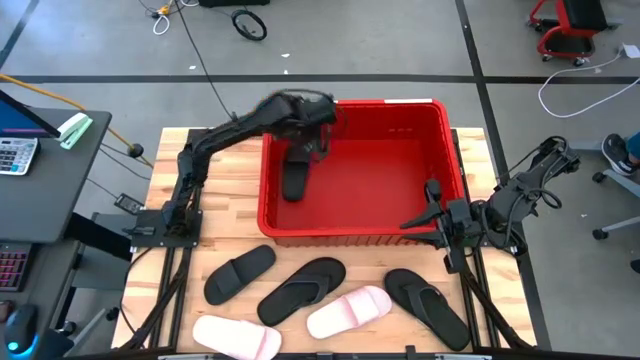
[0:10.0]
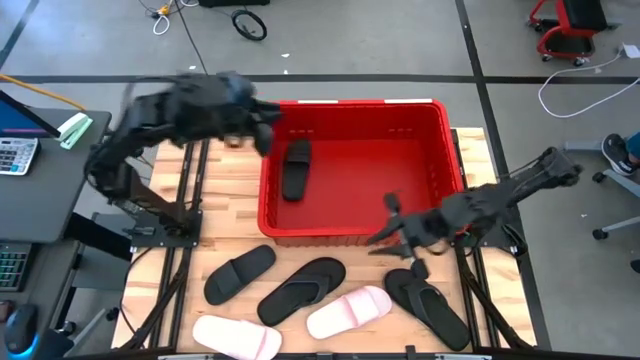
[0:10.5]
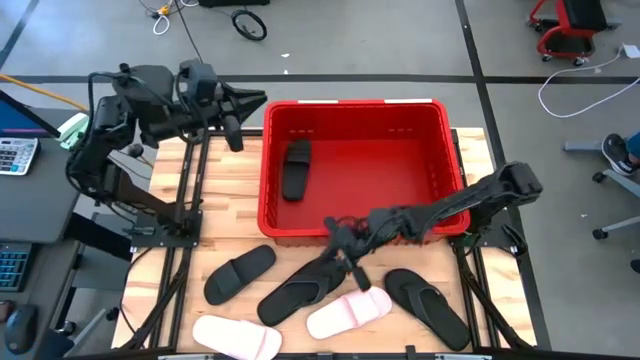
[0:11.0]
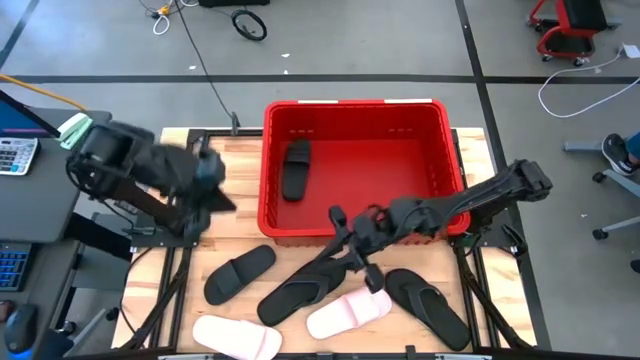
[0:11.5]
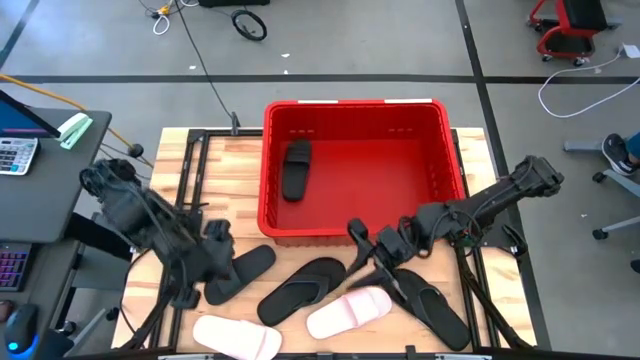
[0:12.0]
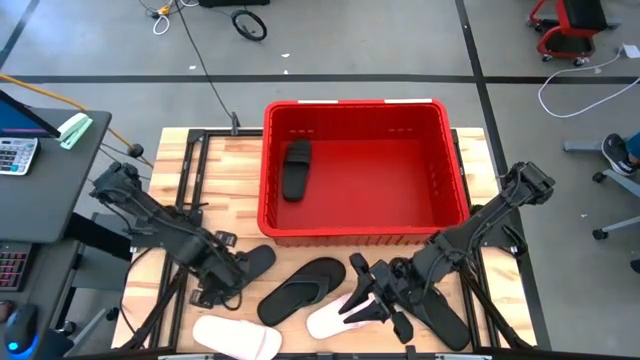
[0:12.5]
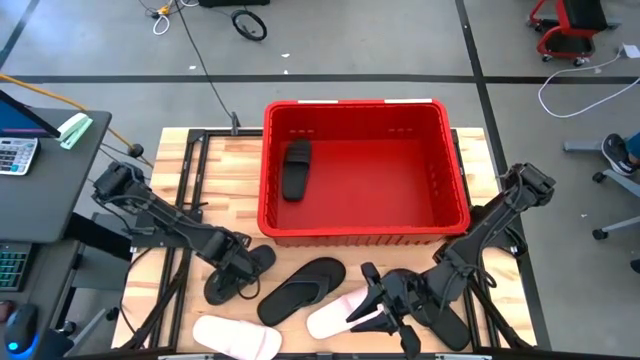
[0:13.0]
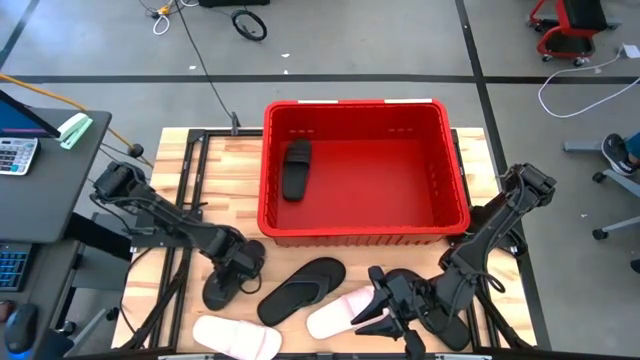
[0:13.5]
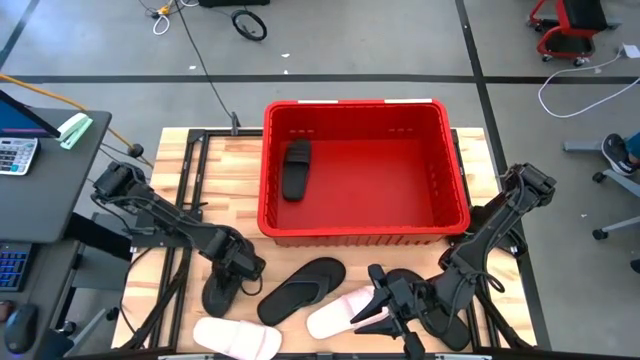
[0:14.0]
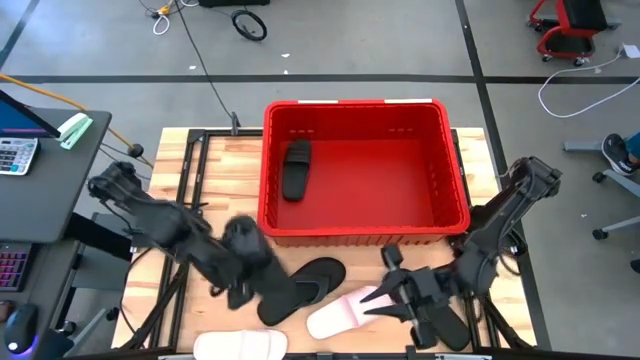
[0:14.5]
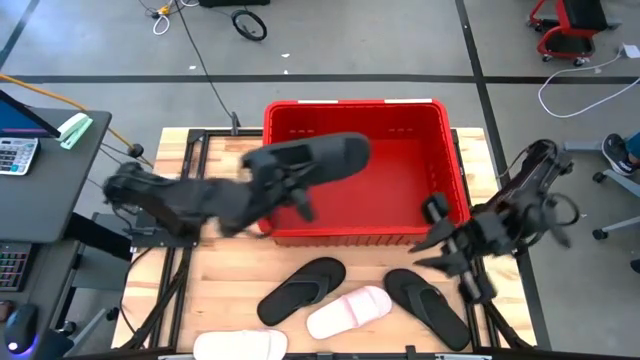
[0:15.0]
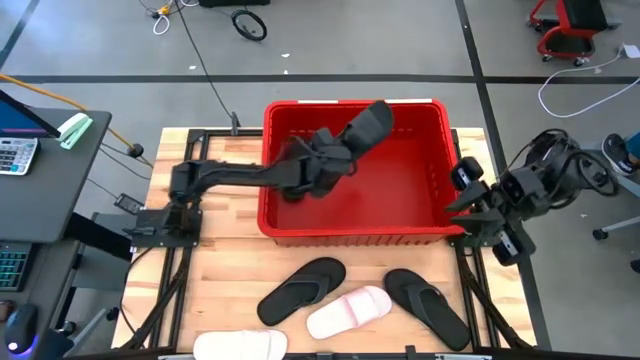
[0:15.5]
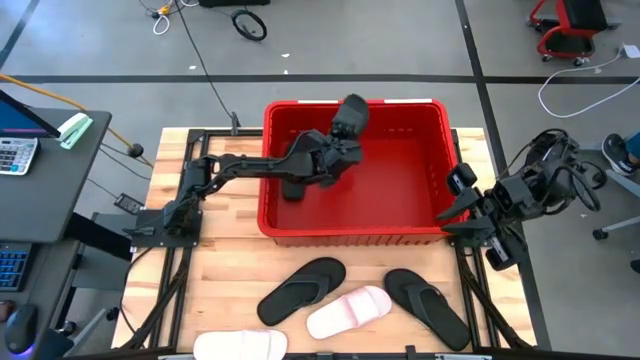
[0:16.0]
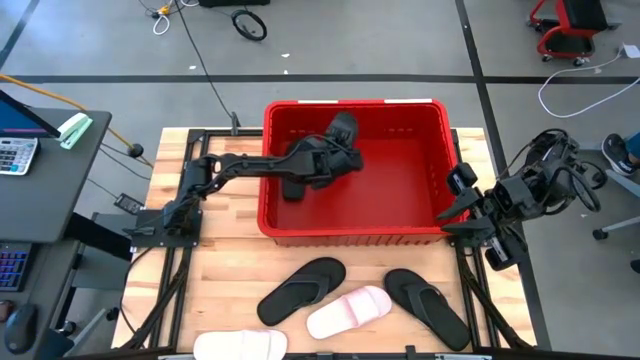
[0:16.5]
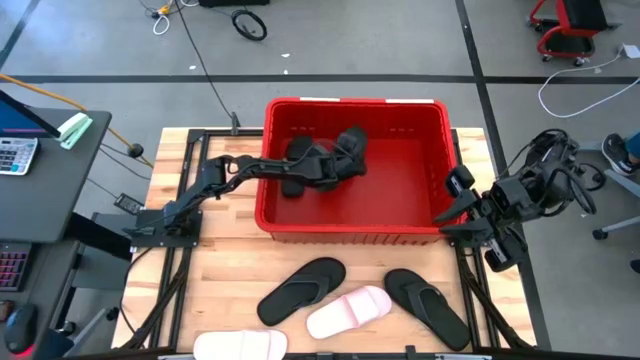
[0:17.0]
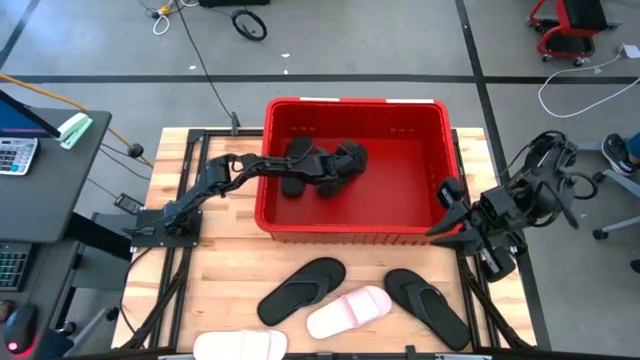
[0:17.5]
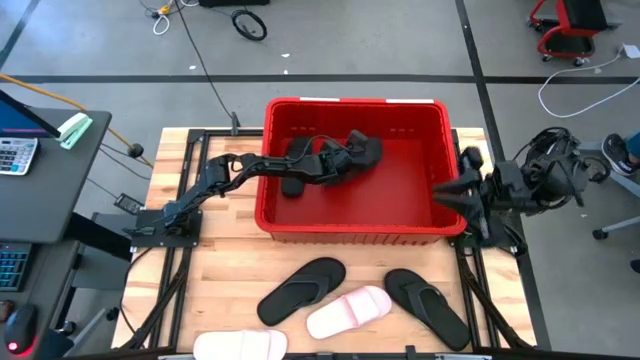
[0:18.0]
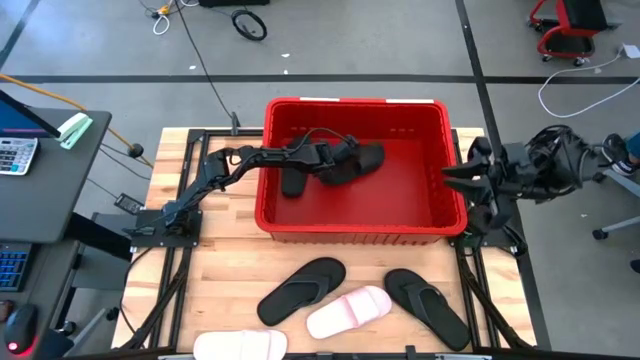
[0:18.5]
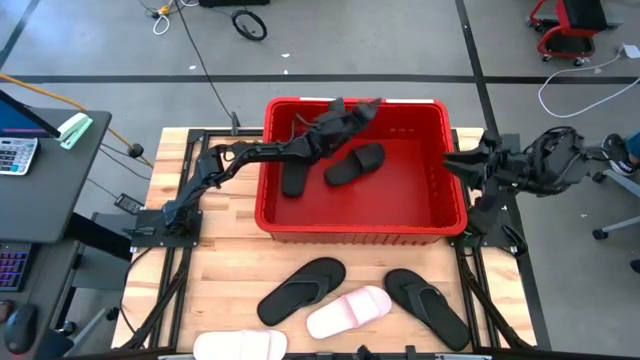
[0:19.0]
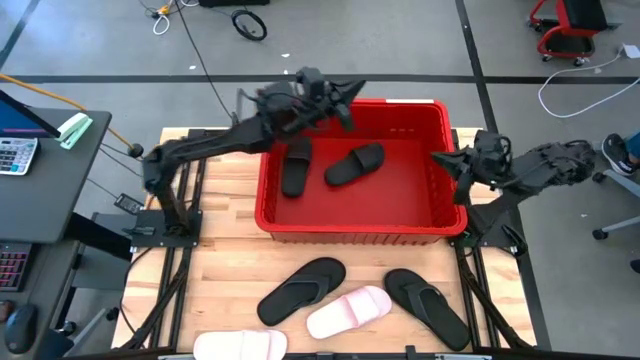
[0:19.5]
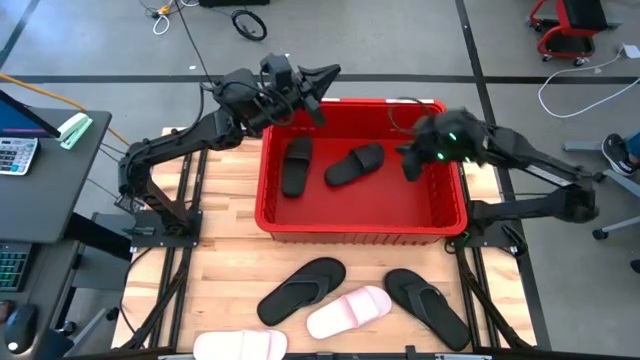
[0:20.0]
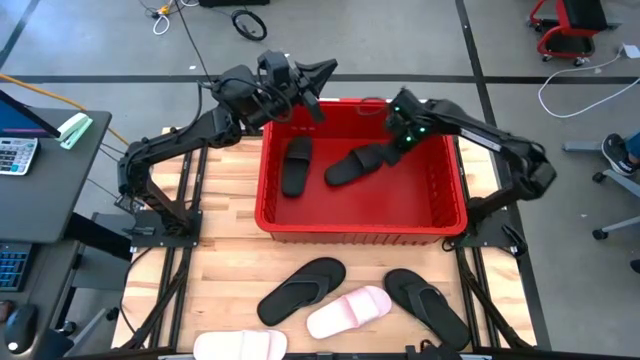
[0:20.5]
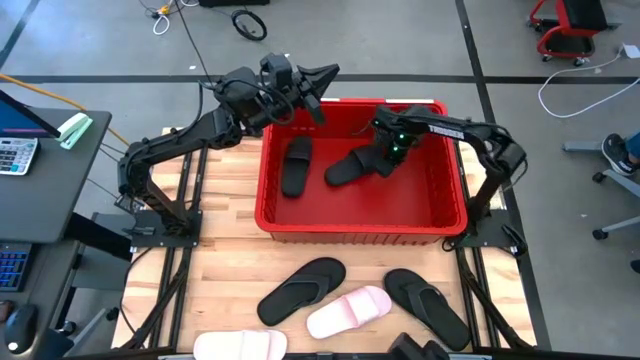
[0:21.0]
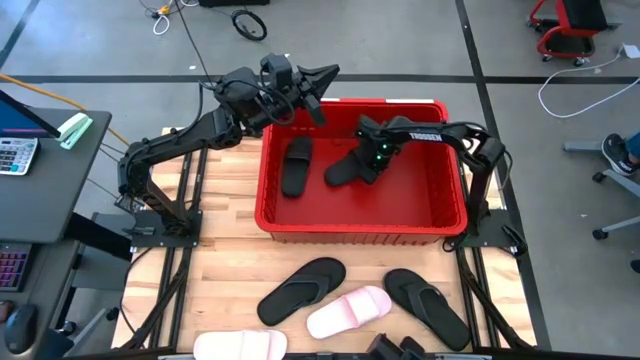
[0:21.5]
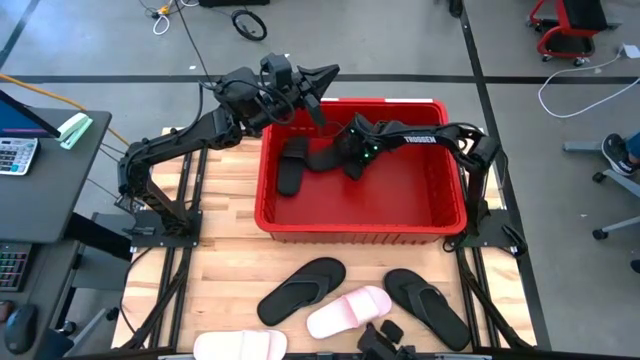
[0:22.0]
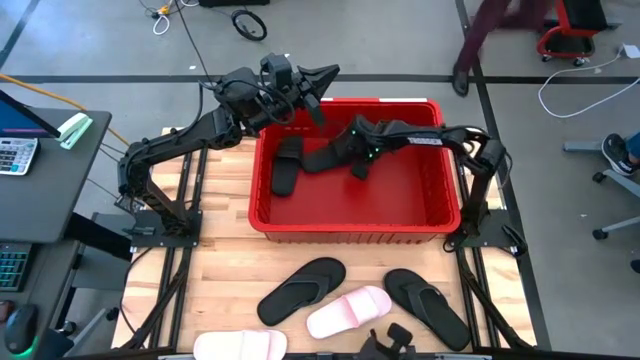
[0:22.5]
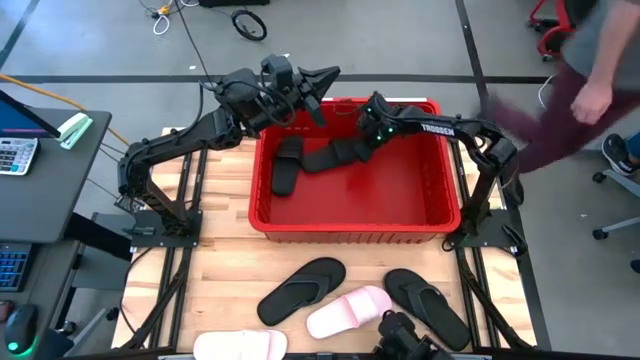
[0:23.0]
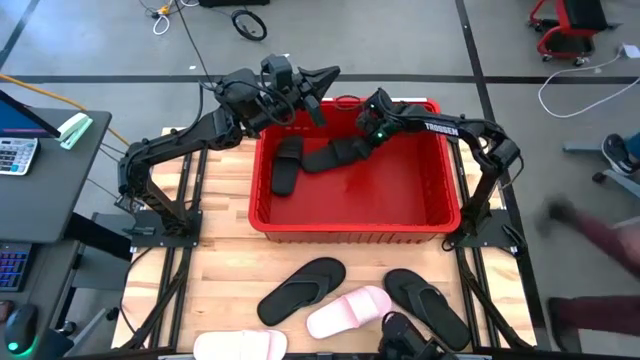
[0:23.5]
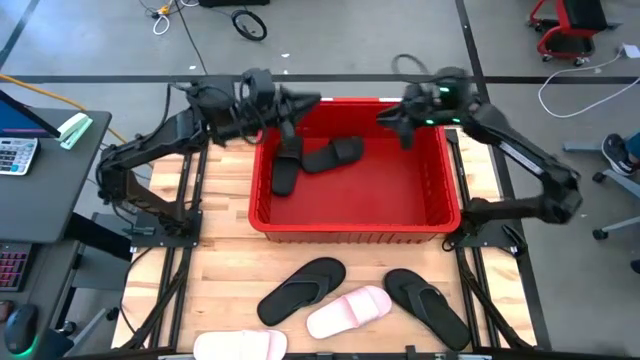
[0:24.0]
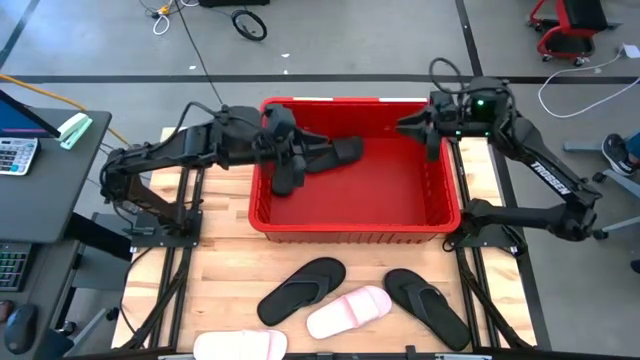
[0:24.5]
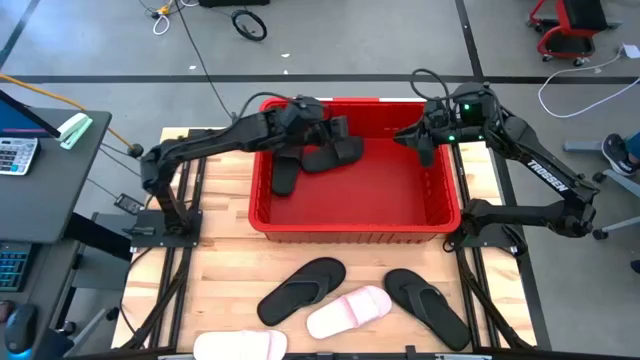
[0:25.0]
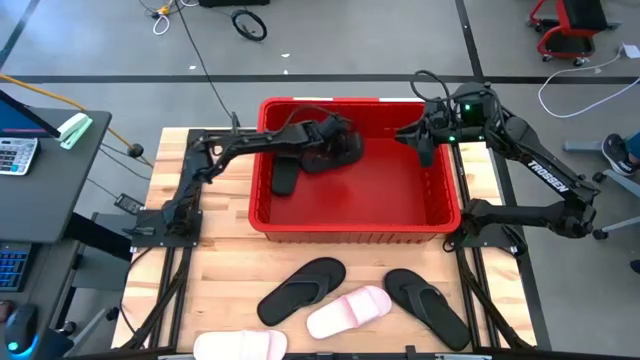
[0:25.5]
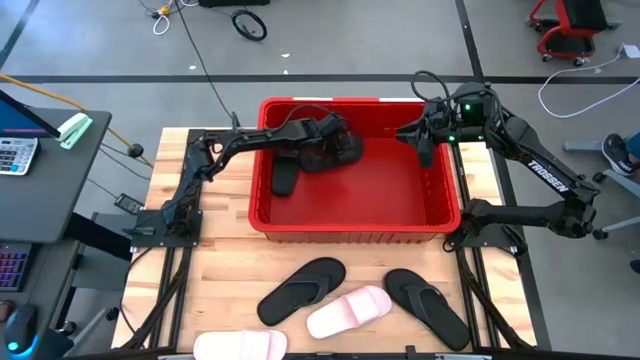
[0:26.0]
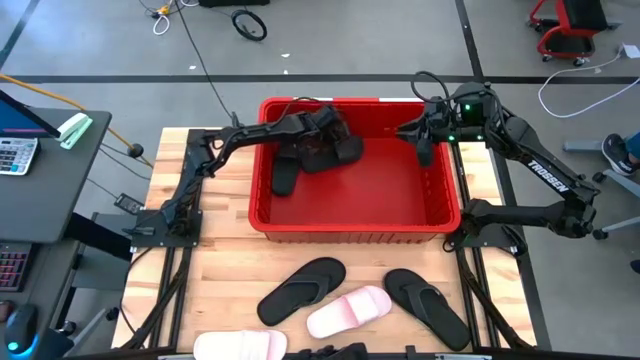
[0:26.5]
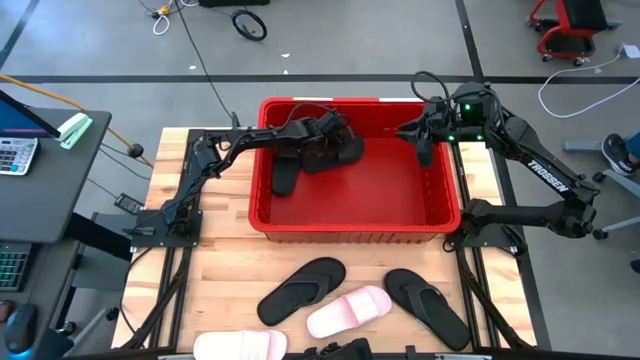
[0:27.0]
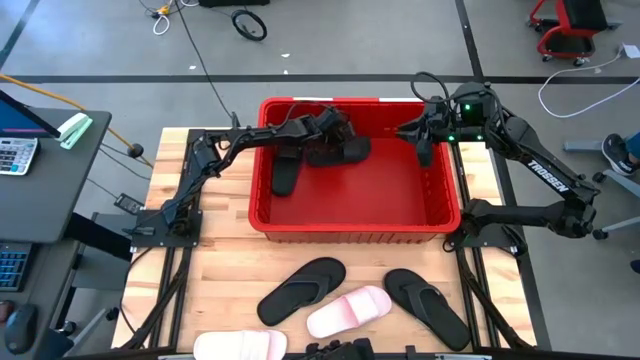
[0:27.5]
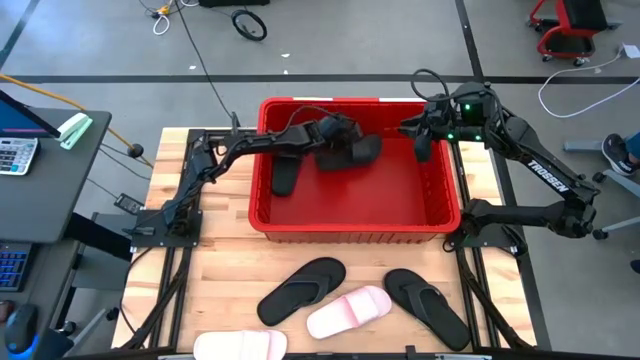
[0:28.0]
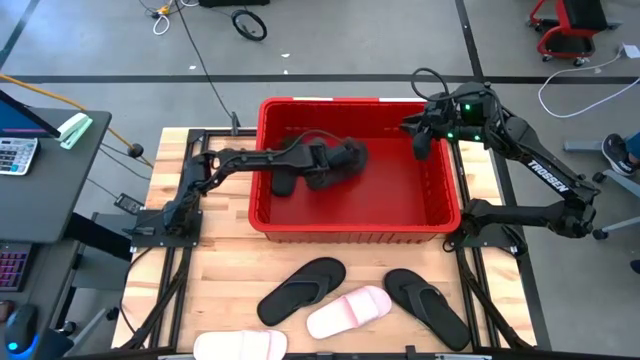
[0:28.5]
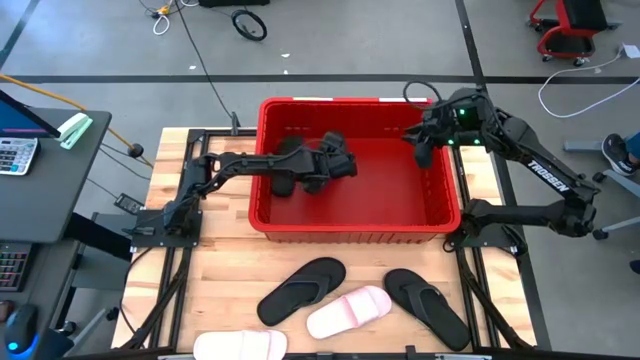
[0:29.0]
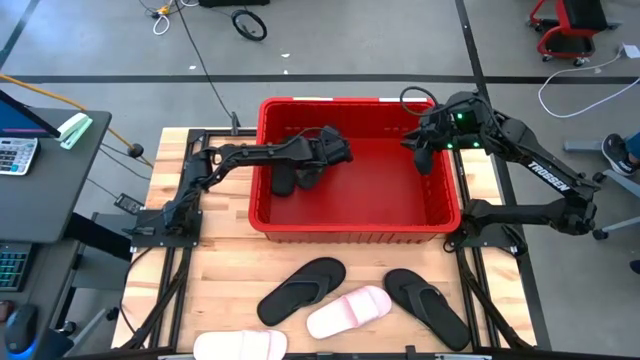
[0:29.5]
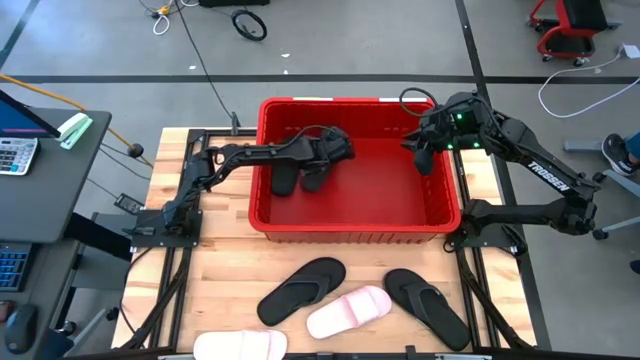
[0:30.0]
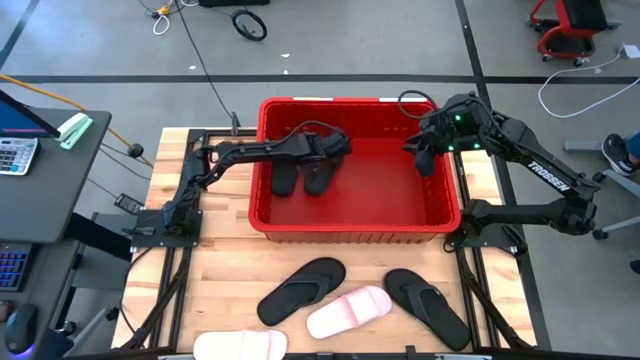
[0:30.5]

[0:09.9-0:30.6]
Task: Pick and place slides into bin
Put the black slide into the red bin
